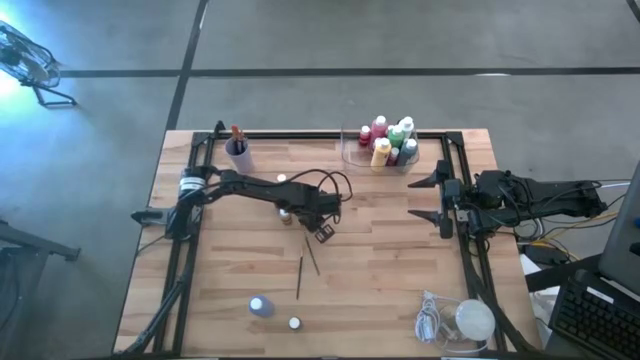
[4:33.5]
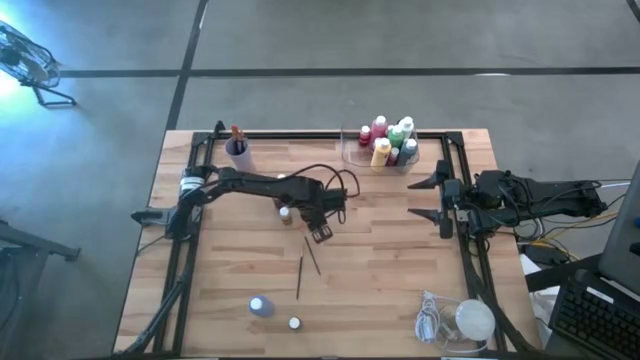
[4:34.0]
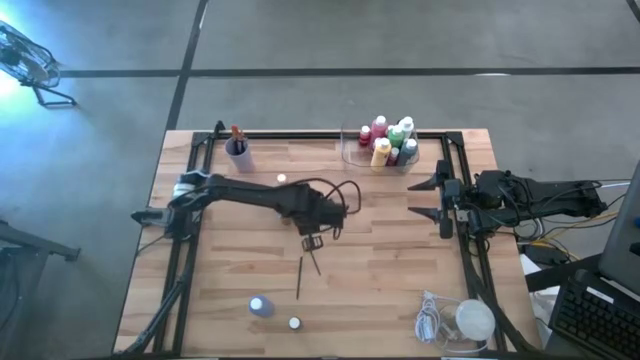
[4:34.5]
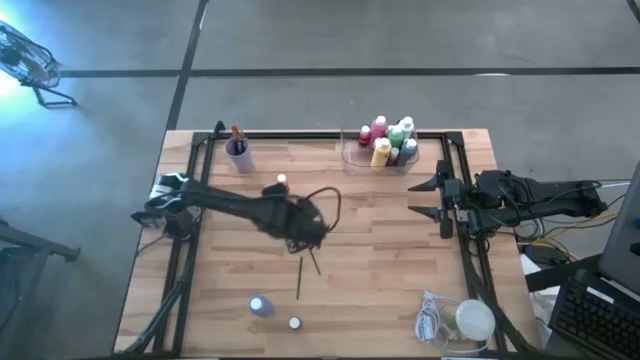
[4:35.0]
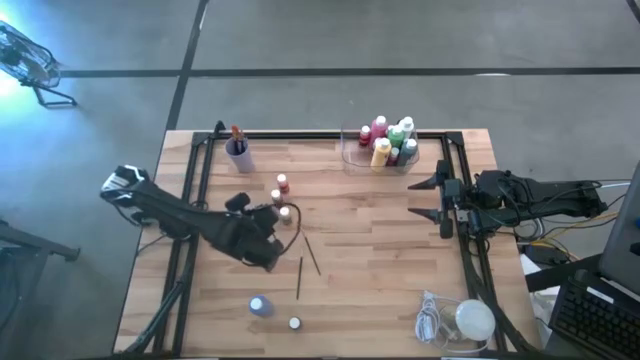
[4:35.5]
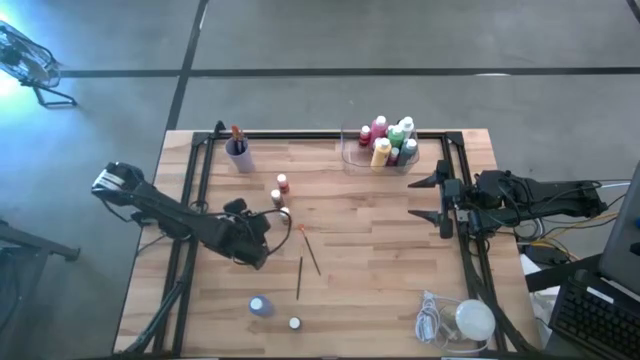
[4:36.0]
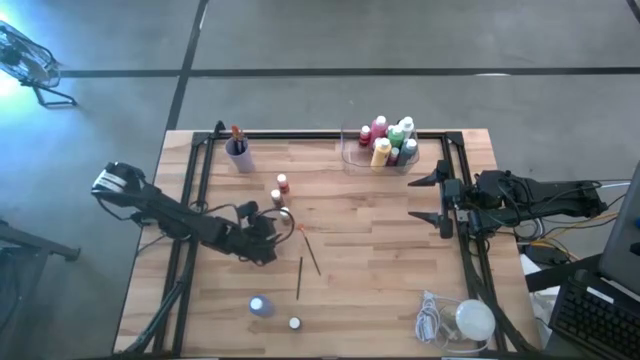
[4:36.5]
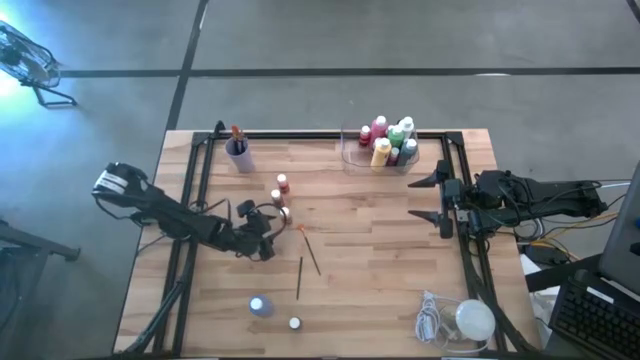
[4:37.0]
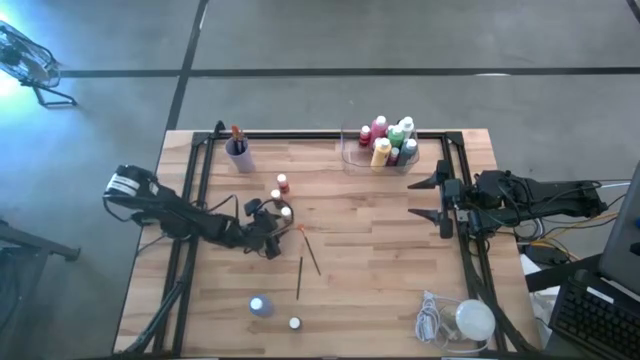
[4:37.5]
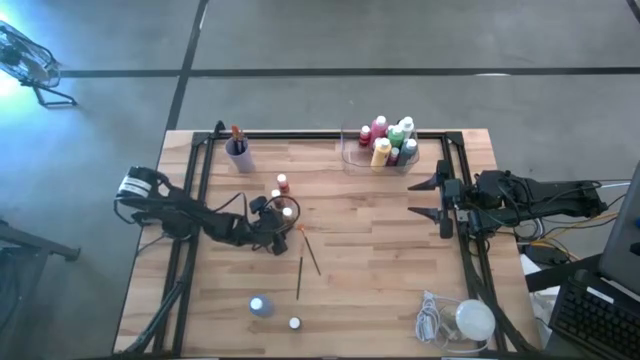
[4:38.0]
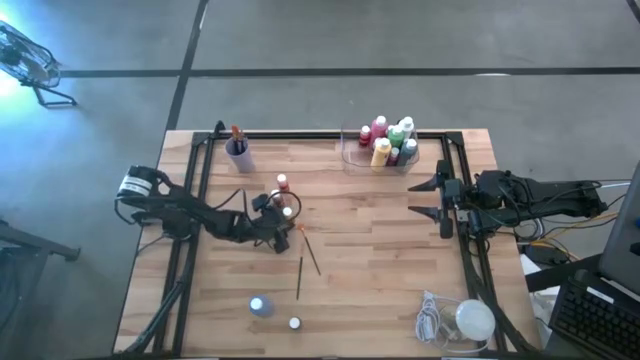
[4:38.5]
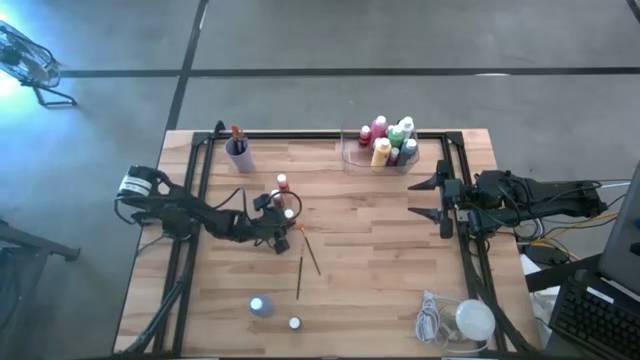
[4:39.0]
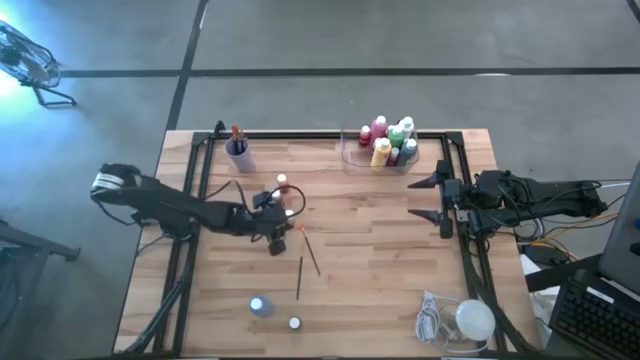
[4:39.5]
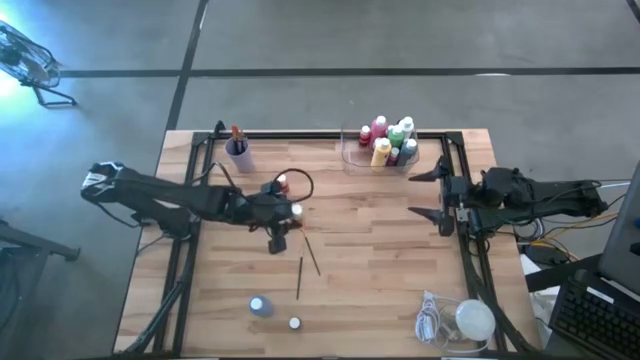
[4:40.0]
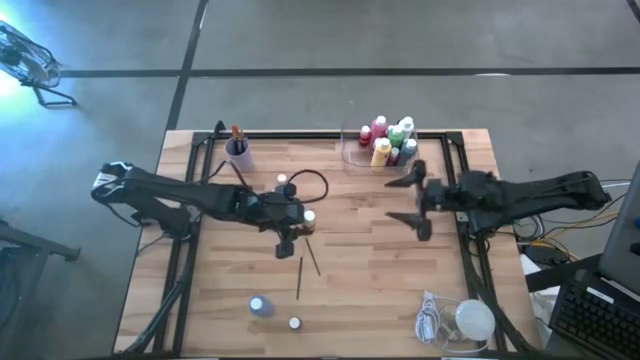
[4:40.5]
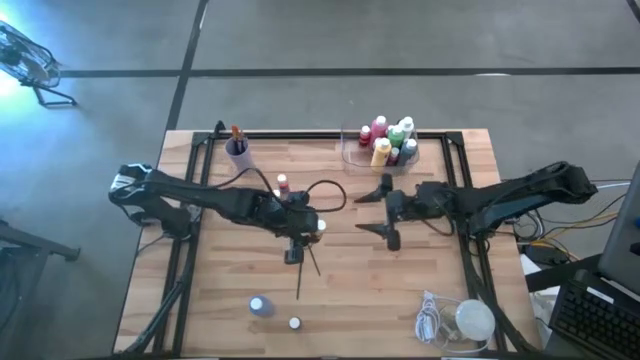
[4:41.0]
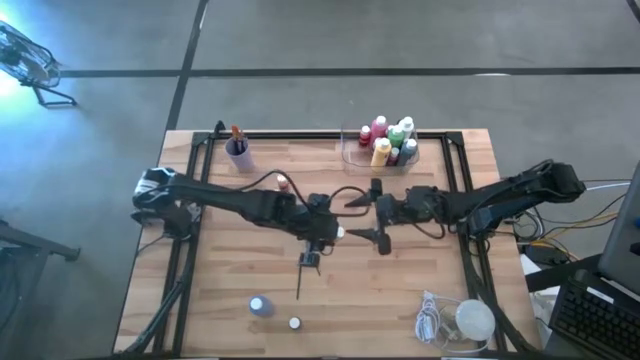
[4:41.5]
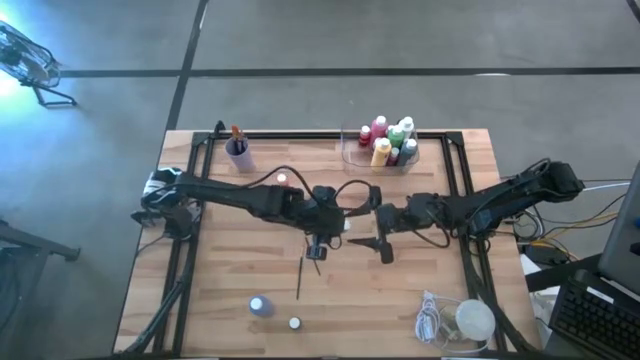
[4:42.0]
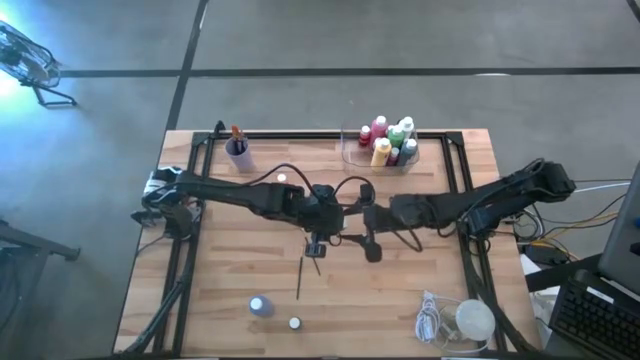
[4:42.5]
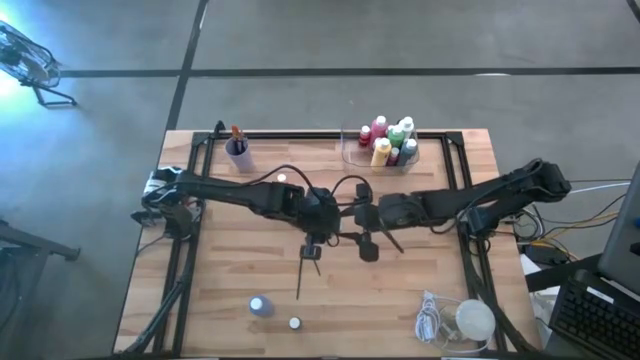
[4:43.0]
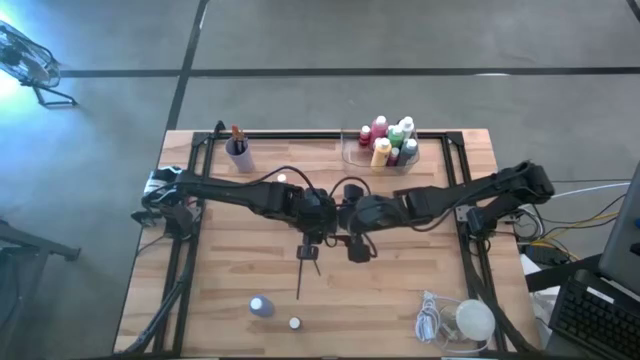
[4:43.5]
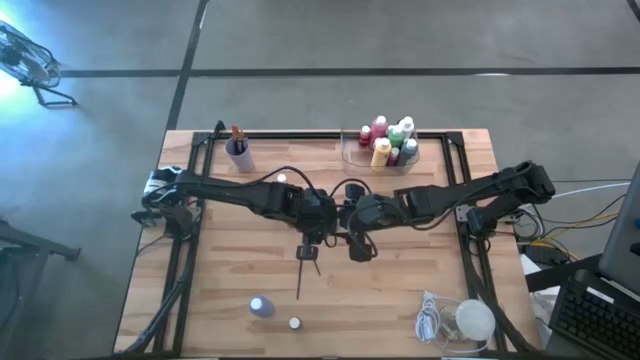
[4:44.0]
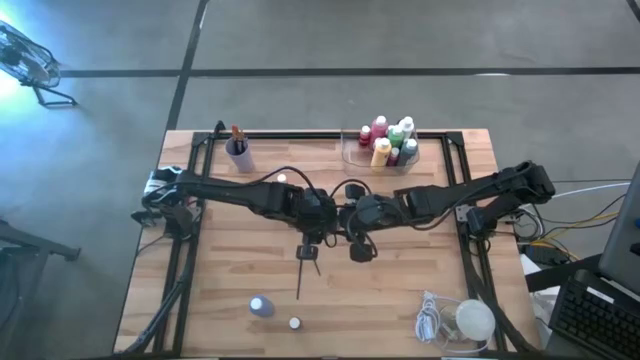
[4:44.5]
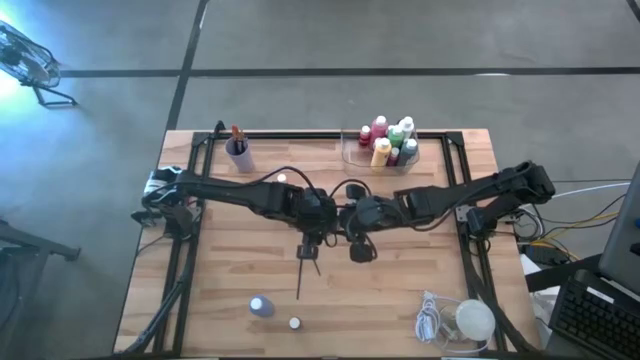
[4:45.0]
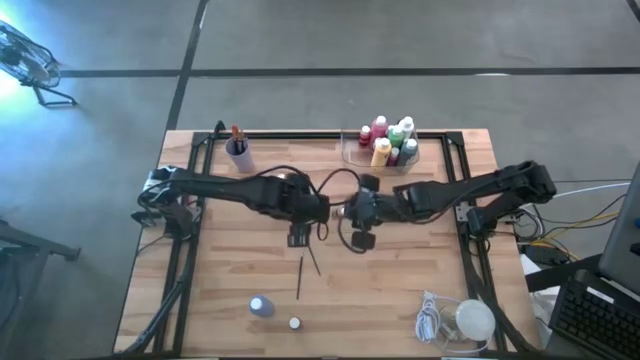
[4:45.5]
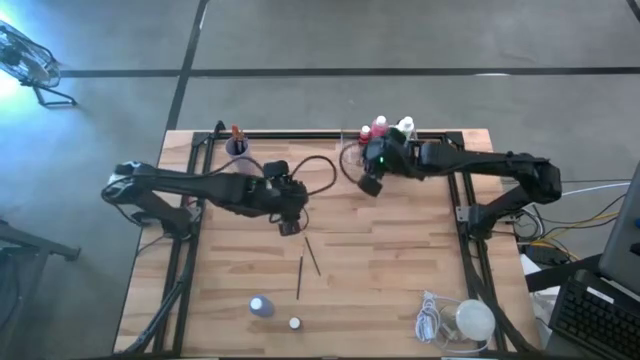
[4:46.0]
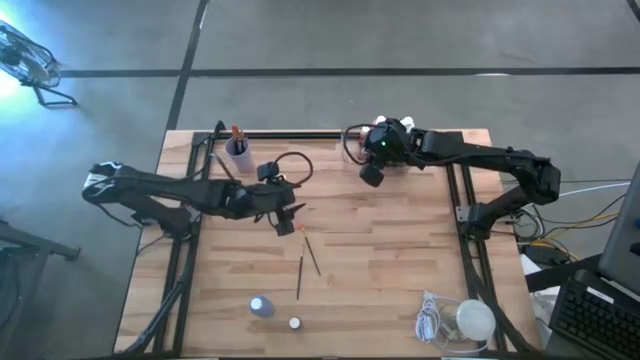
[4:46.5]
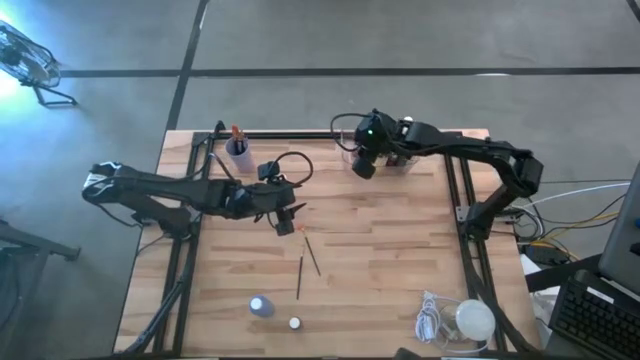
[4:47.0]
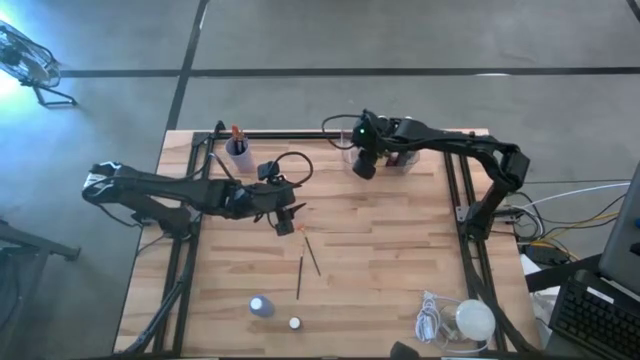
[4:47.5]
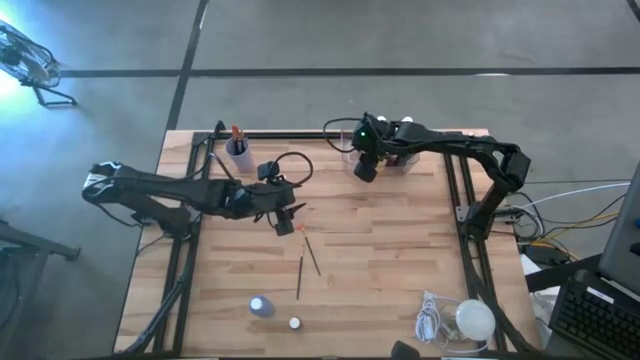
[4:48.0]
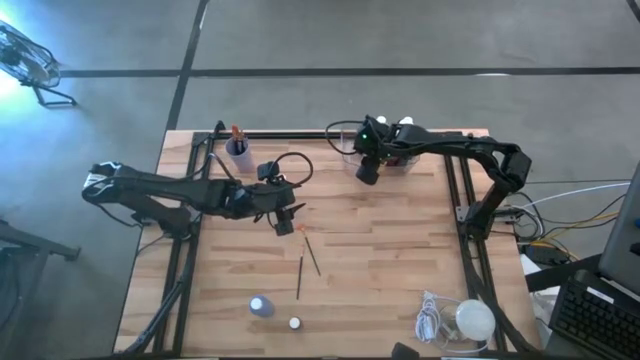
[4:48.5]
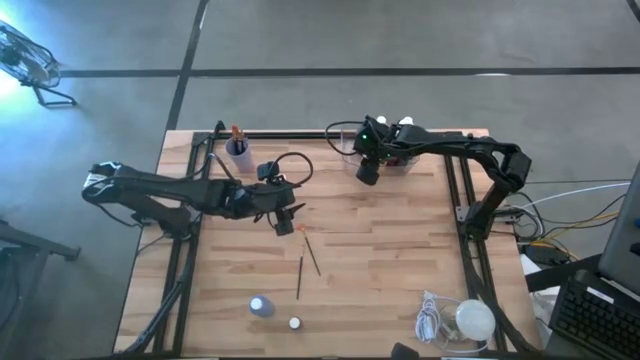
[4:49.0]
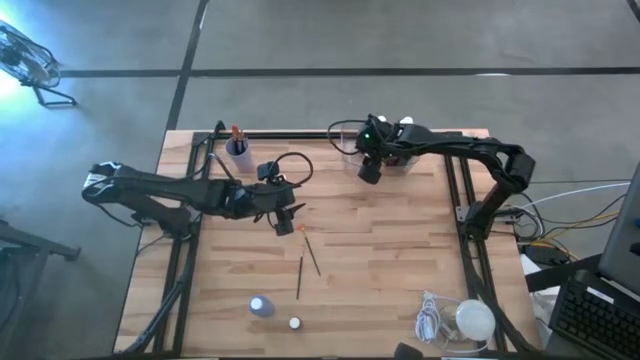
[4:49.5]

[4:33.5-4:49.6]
Task: Pick & Place Paint Supplies
Put the yellow paint bottle into the transparent bin
